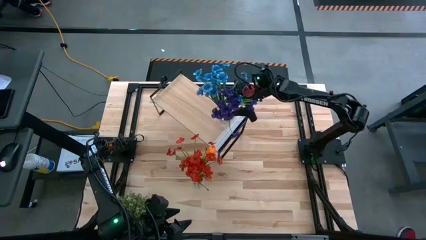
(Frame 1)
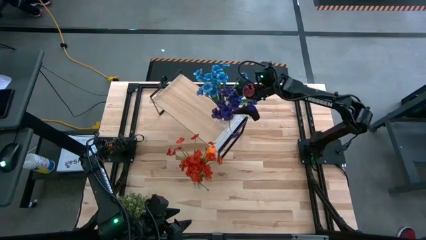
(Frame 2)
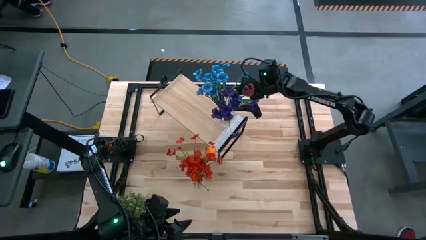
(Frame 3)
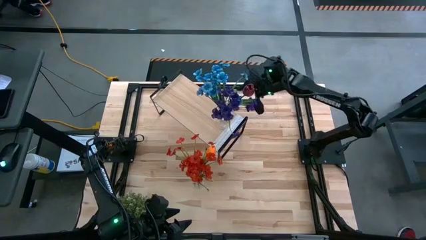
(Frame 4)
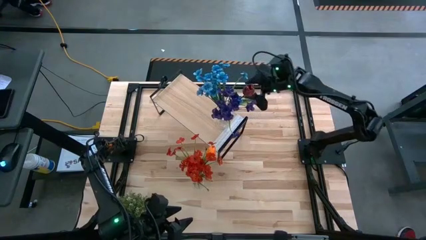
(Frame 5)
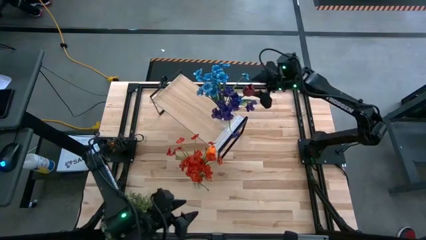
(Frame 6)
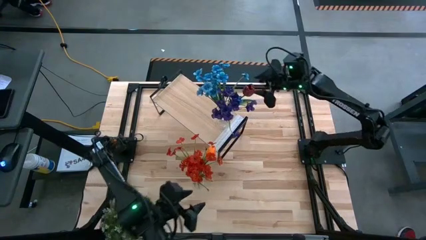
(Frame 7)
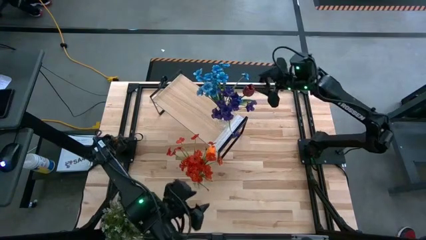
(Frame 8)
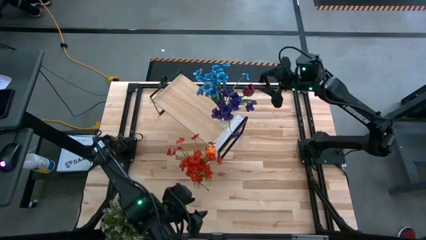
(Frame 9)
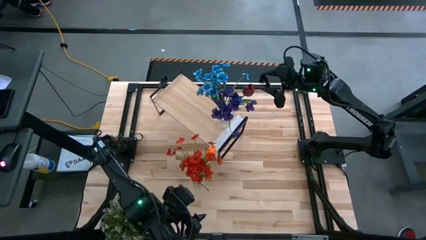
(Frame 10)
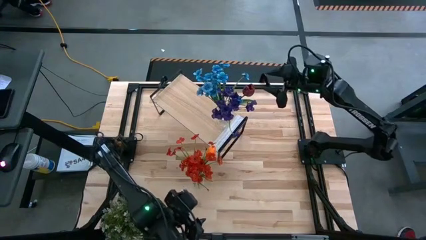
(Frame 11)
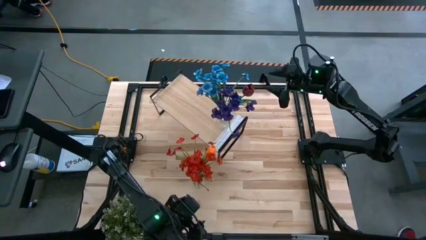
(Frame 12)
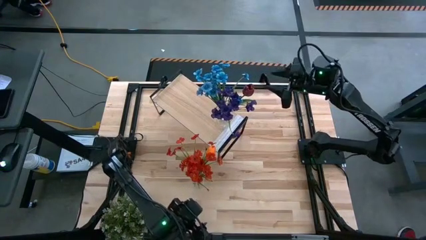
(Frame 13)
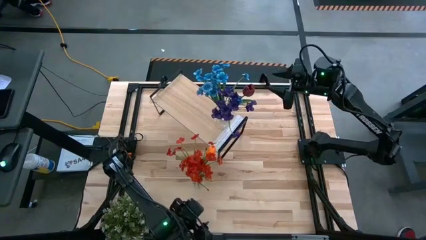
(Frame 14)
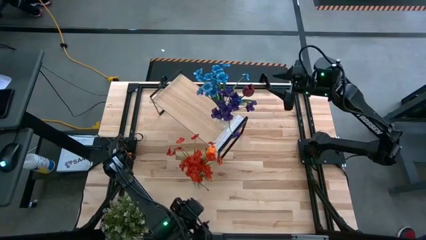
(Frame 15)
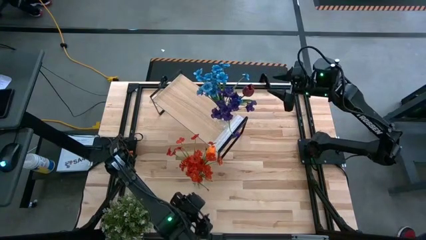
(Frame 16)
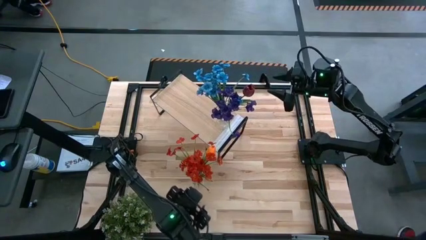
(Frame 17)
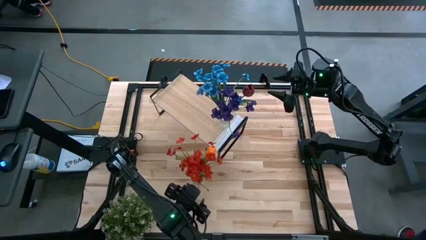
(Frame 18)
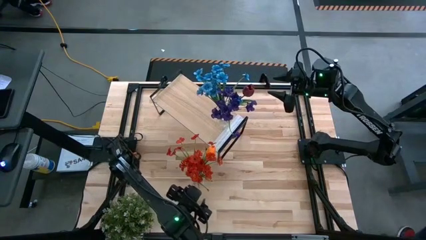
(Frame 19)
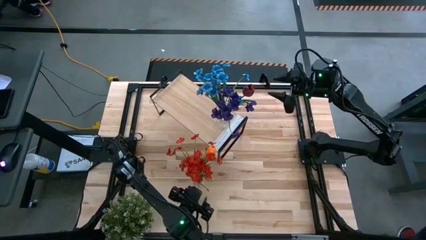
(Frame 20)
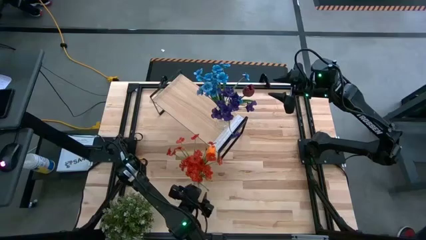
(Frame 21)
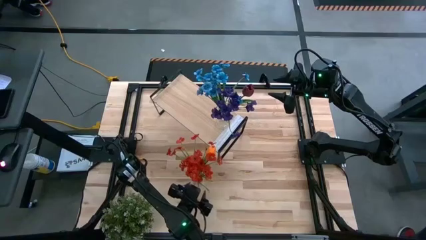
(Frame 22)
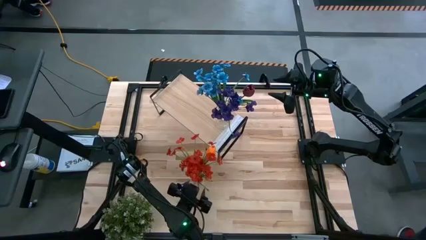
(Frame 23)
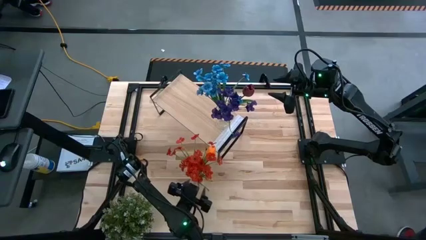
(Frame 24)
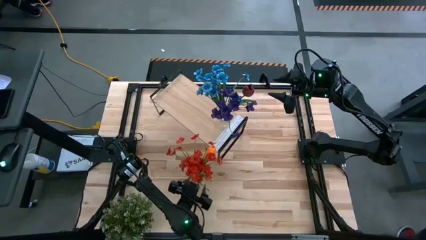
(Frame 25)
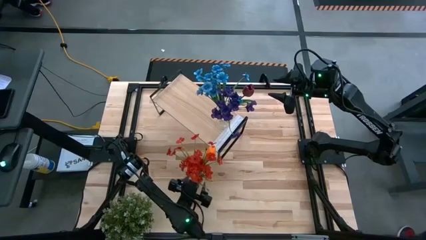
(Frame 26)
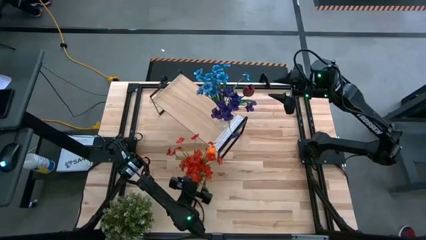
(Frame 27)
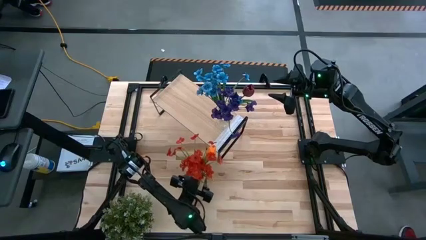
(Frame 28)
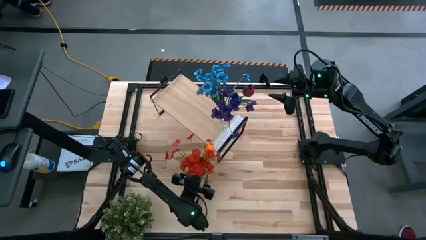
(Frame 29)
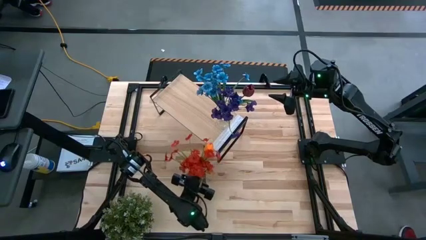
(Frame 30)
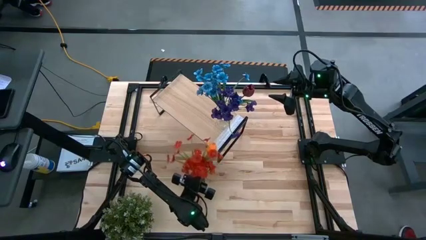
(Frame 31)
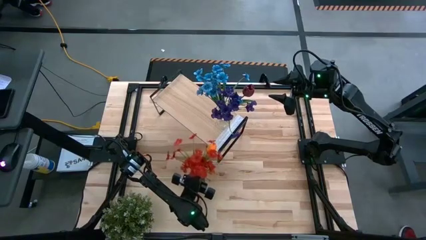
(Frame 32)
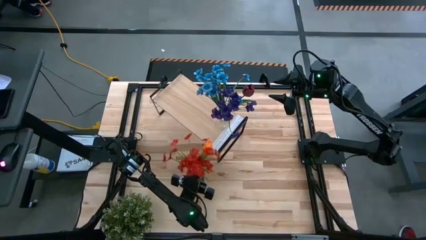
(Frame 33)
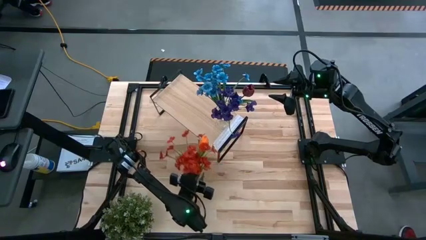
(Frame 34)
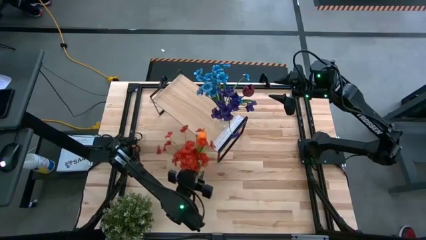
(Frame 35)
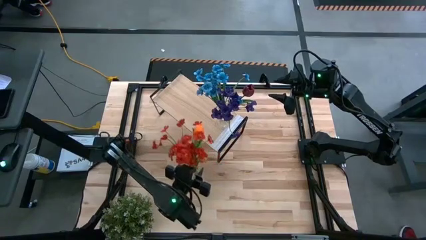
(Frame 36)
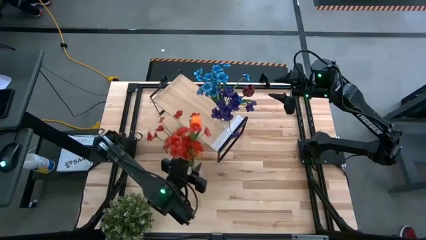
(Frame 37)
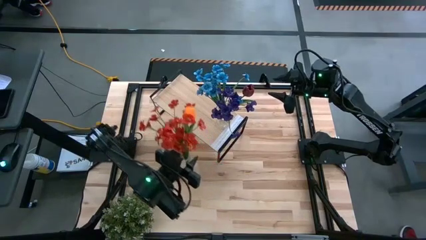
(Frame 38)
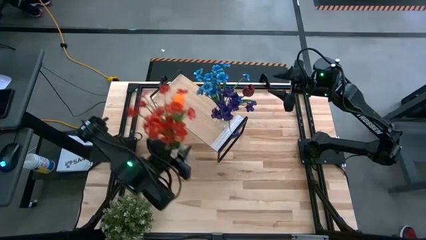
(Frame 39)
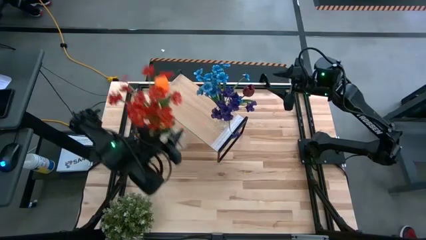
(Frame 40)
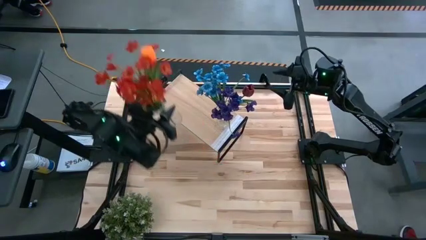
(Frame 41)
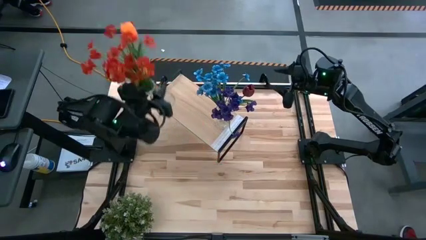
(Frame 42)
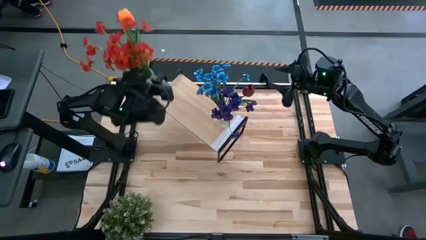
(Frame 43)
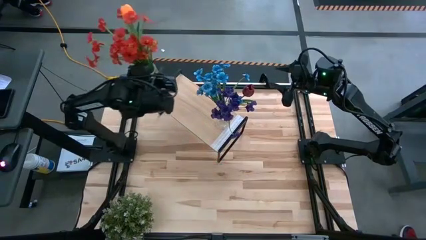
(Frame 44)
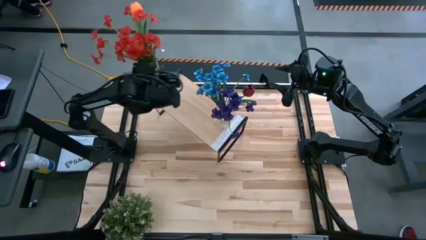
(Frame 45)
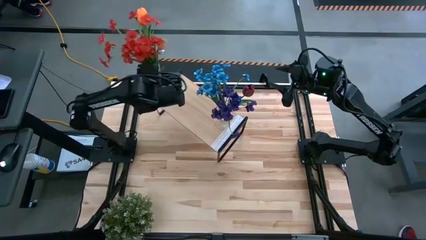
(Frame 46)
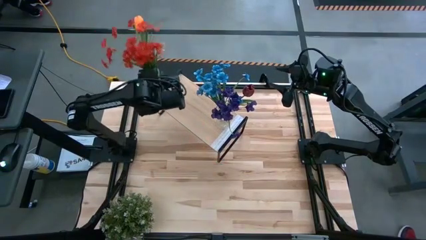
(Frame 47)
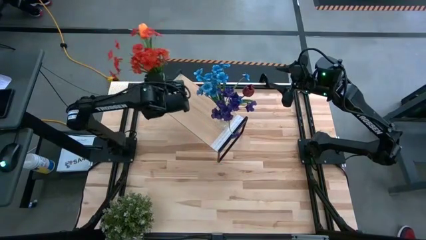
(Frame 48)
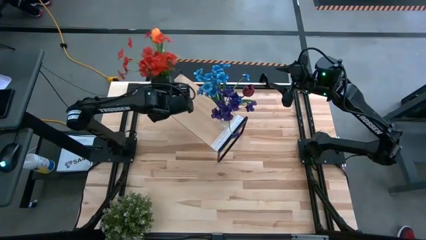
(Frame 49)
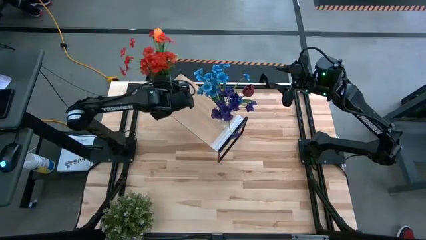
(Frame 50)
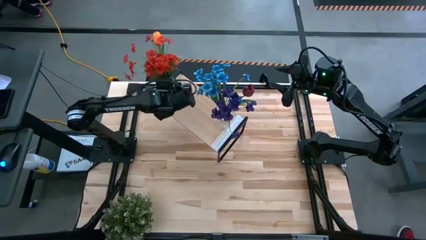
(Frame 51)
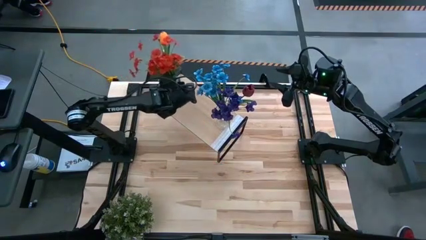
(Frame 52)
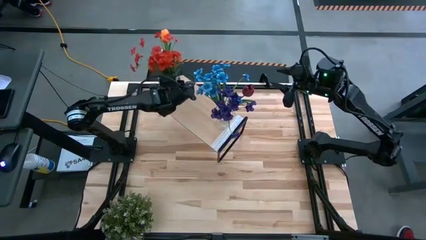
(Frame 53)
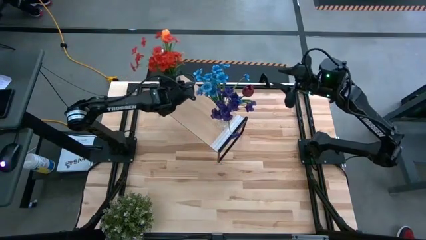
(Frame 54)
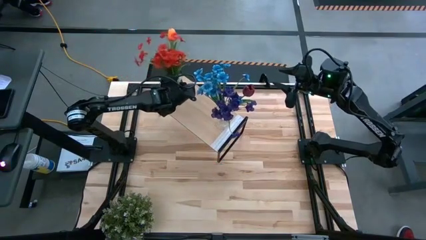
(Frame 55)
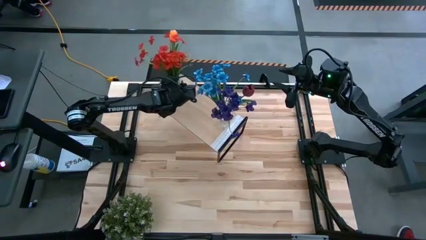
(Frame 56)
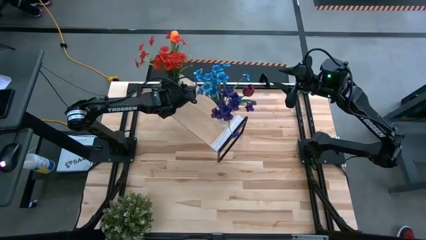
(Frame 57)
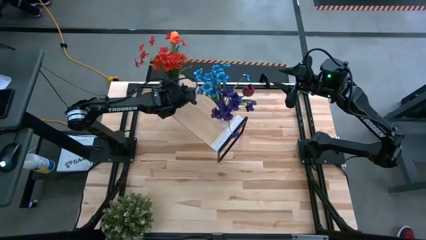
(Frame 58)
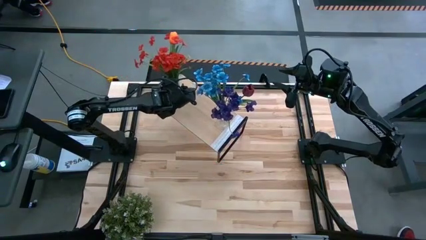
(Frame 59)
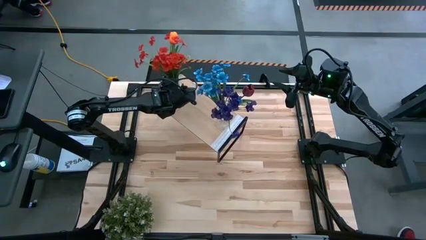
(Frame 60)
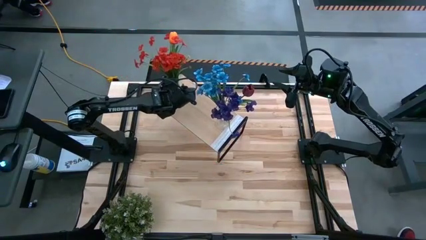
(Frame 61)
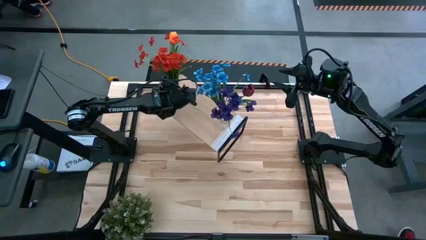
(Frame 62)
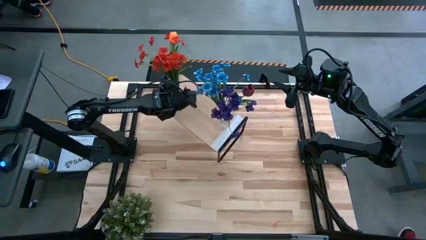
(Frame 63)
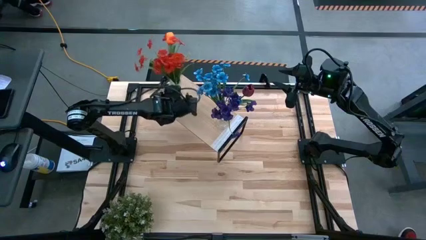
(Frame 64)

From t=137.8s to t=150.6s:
Task: Pick and place flowers into a vace then onto a shelf
Put the transparent flower vase on the shelf

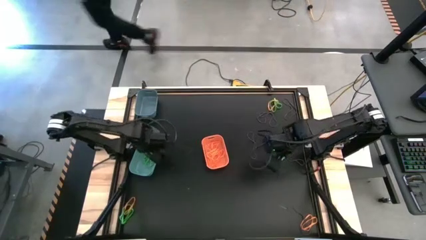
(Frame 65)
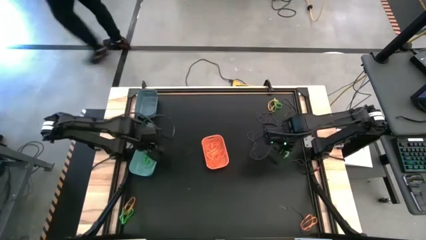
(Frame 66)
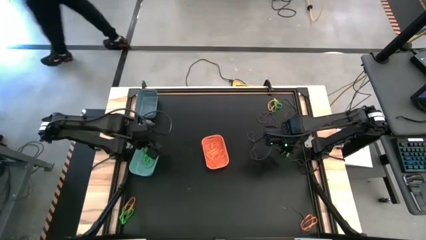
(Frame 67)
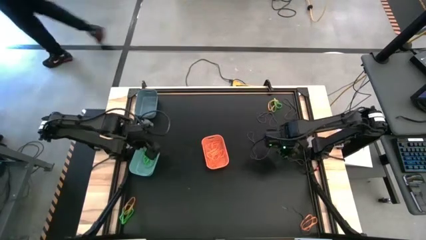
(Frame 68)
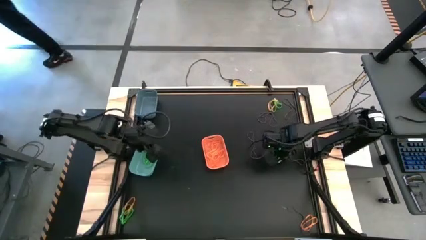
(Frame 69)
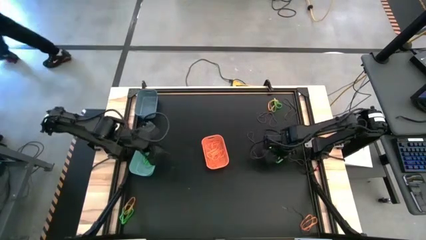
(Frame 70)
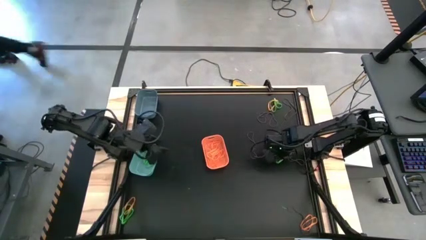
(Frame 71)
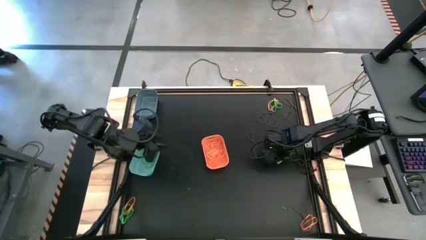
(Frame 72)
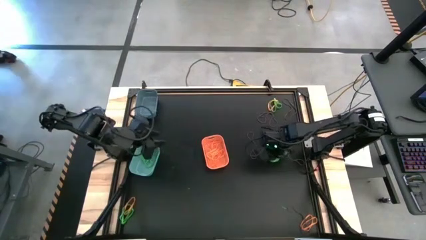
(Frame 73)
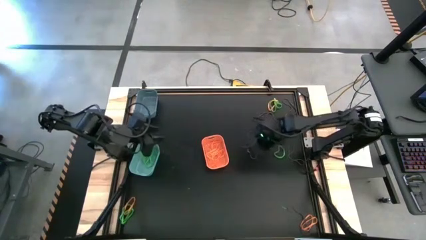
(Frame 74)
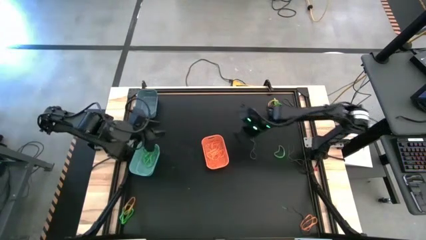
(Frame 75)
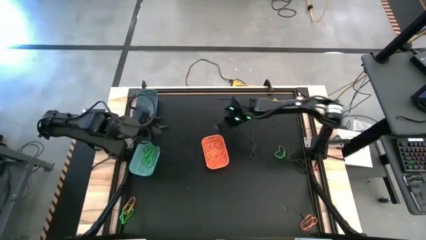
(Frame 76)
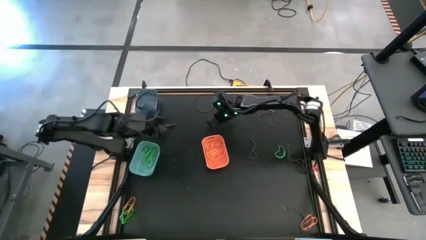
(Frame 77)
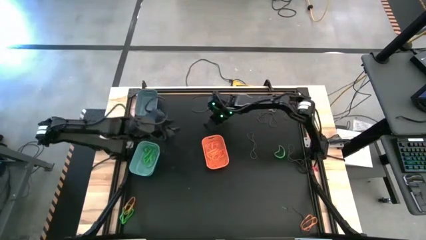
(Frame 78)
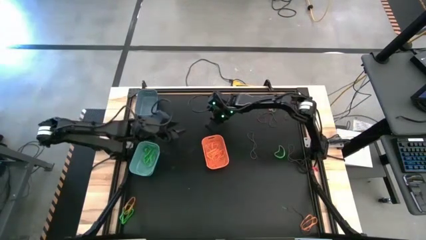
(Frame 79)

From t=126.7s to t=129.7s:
Task: Sort rubber bands into baskets
Move the green rubber band
